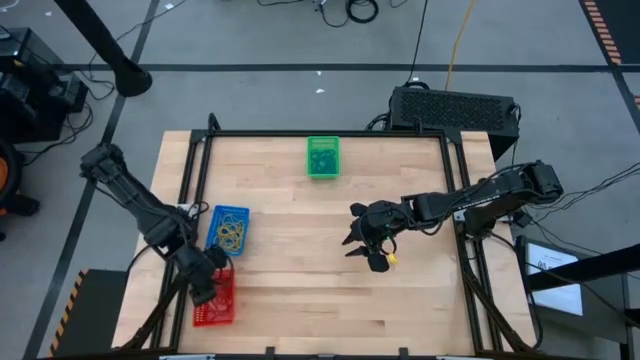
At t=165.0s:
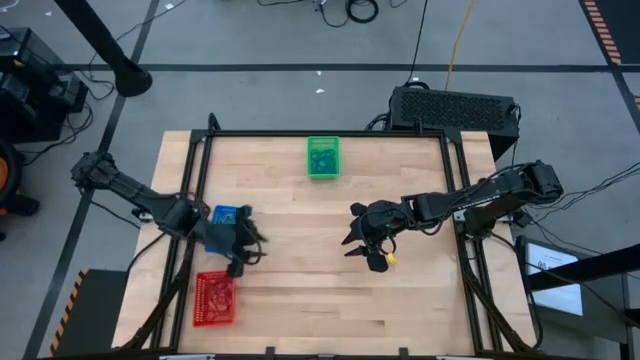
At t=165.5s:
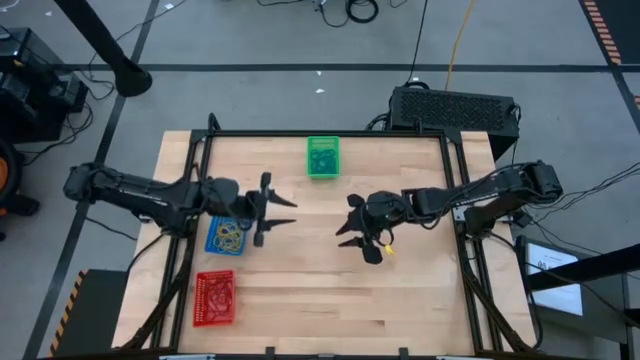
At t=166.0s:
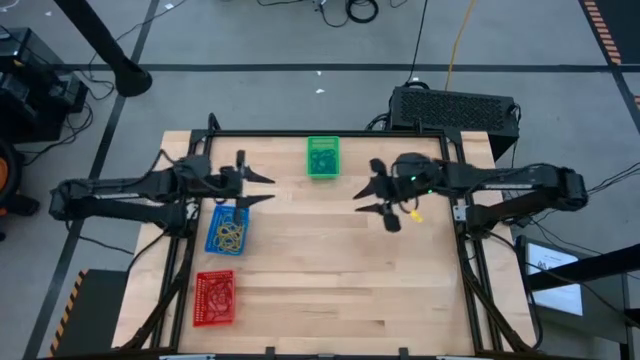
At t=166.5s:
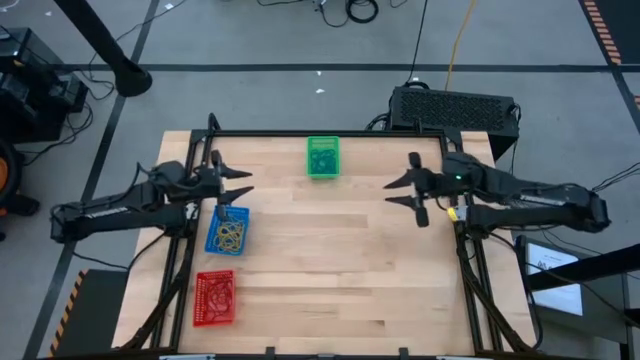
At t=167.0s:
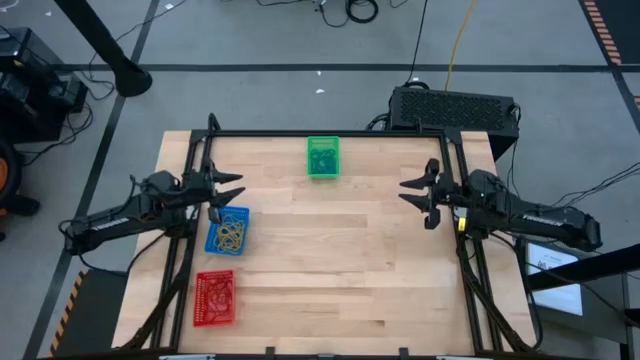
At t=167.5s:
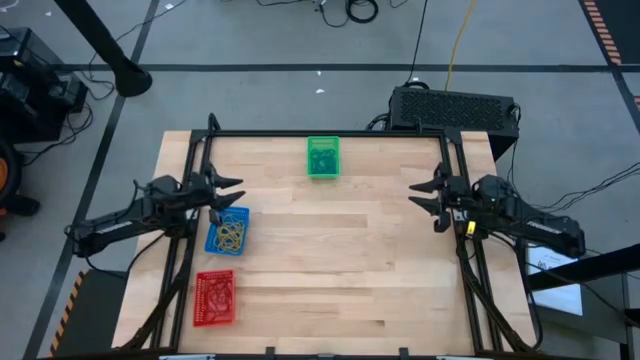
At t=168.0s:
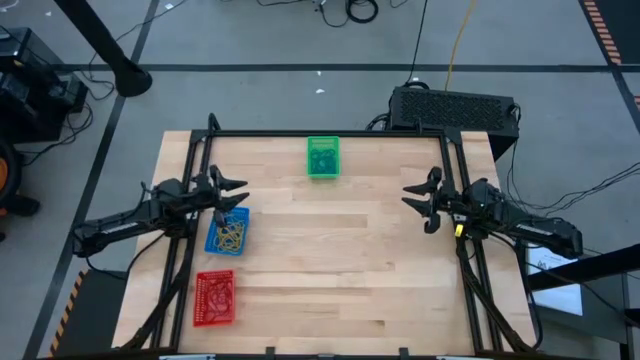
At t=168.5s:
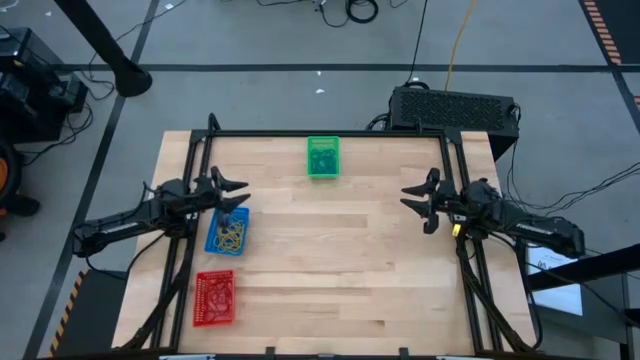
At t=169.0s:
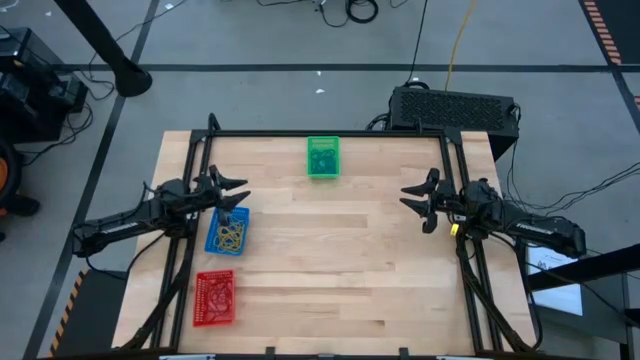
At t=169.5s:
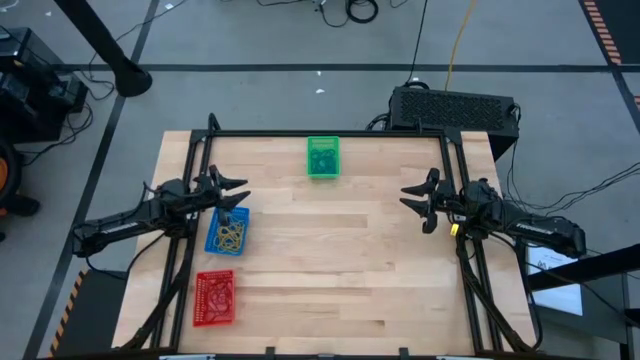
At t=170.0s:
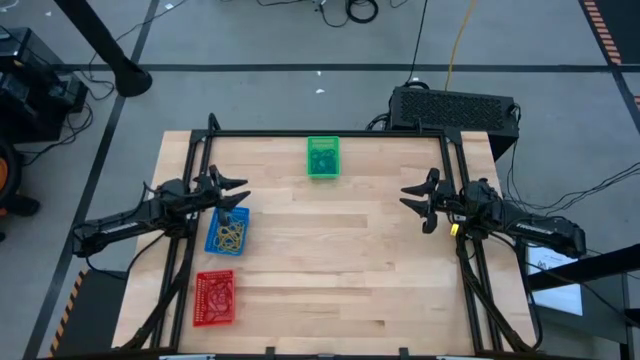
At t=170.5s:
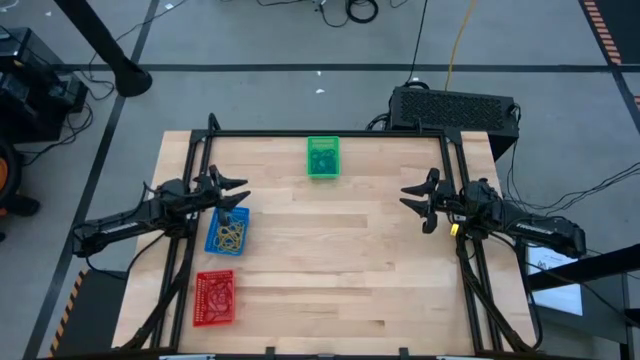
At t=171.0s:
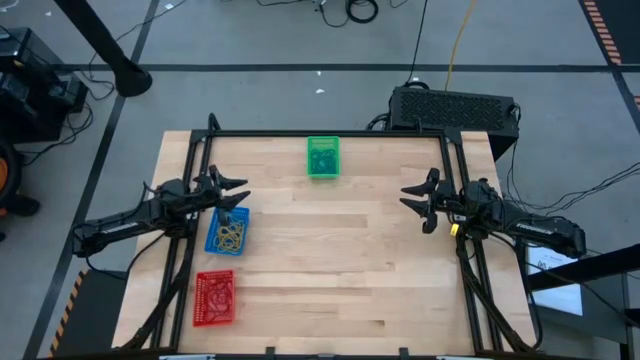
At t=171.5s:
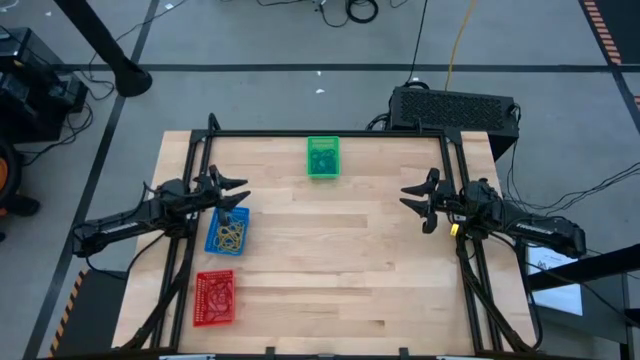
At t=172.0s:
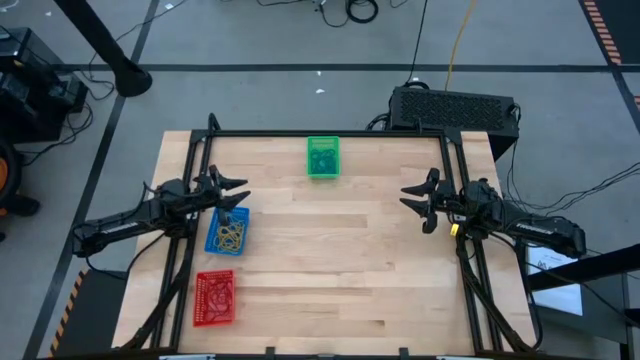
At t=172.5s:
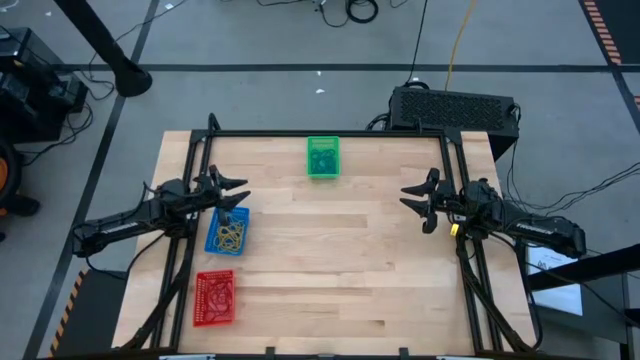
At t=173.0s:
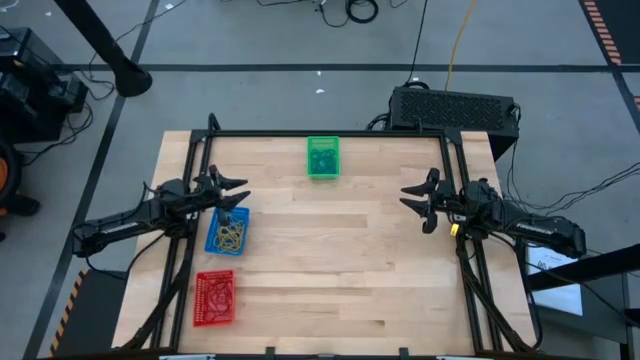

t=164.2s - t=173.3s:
Task: Sort rubber bands into baskets
Return to Home Position

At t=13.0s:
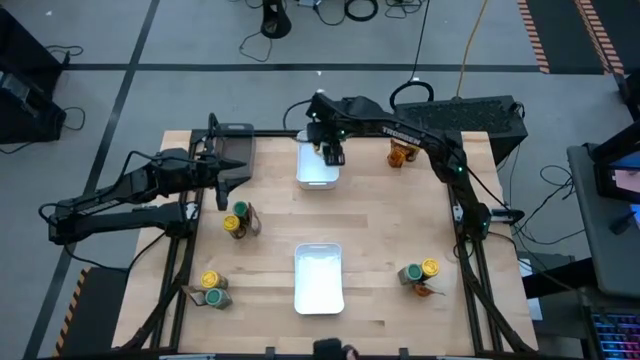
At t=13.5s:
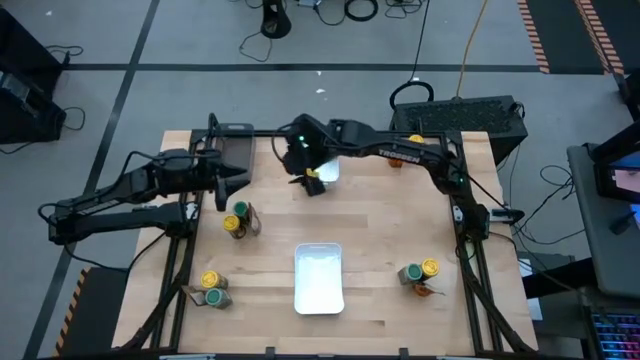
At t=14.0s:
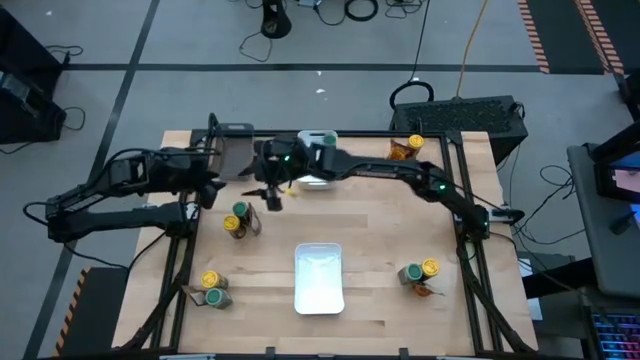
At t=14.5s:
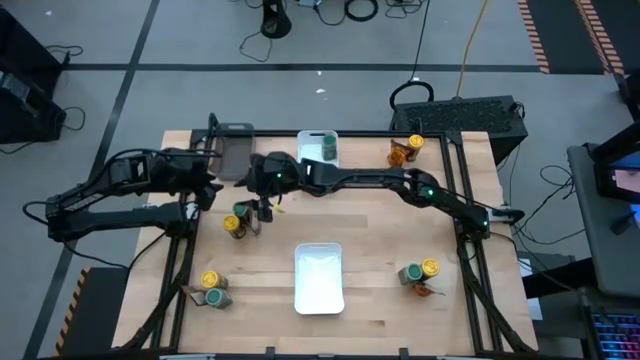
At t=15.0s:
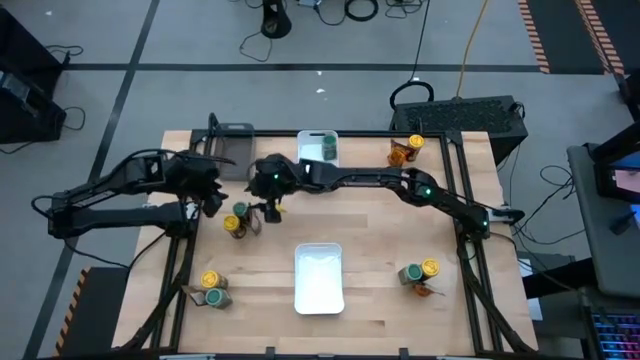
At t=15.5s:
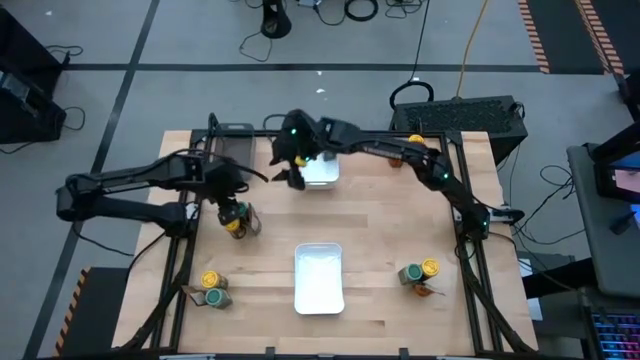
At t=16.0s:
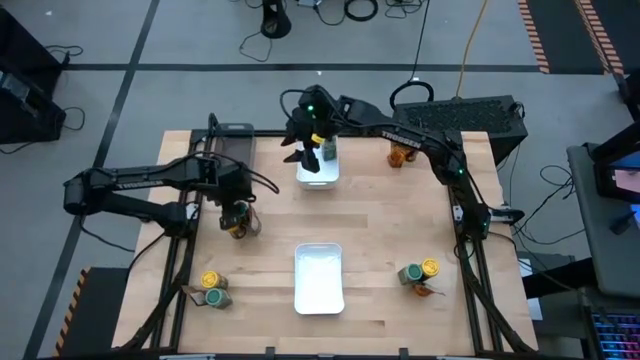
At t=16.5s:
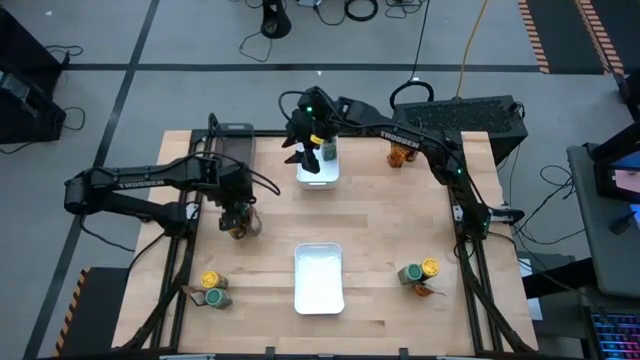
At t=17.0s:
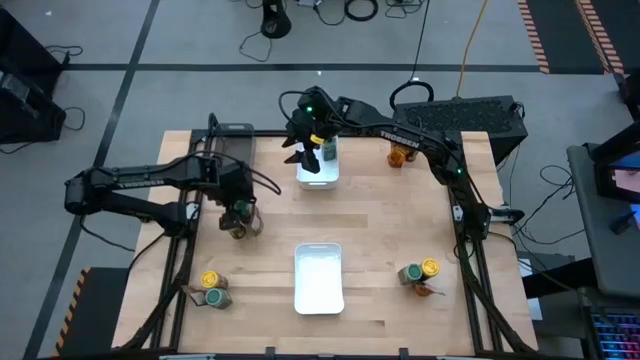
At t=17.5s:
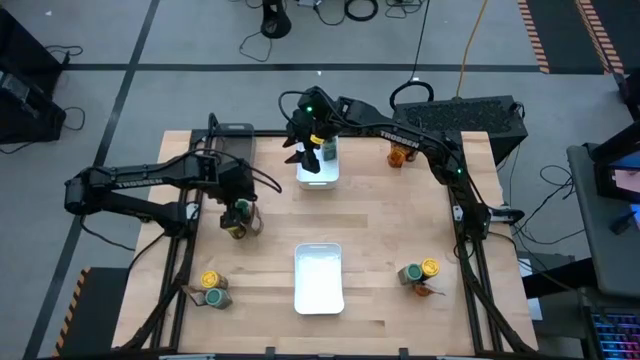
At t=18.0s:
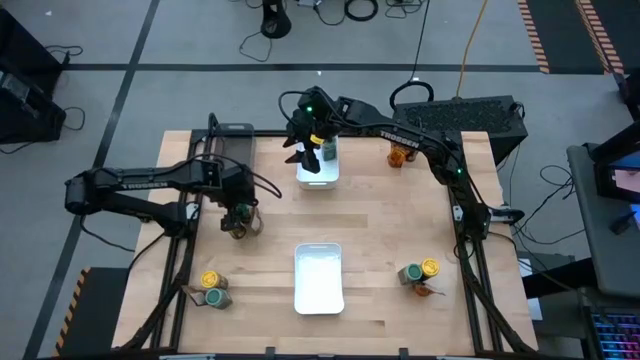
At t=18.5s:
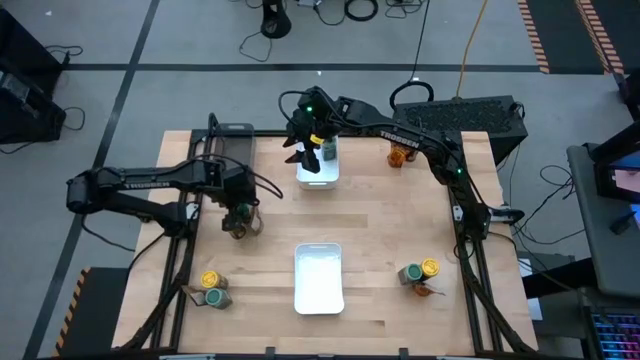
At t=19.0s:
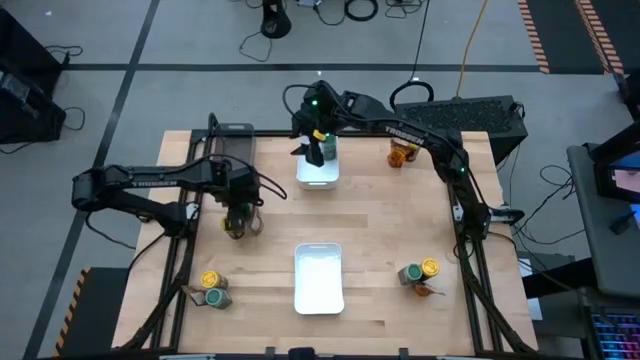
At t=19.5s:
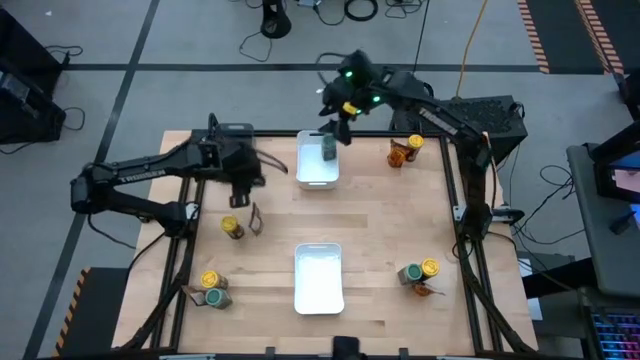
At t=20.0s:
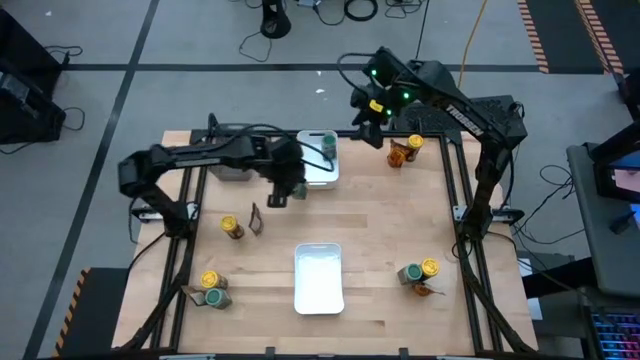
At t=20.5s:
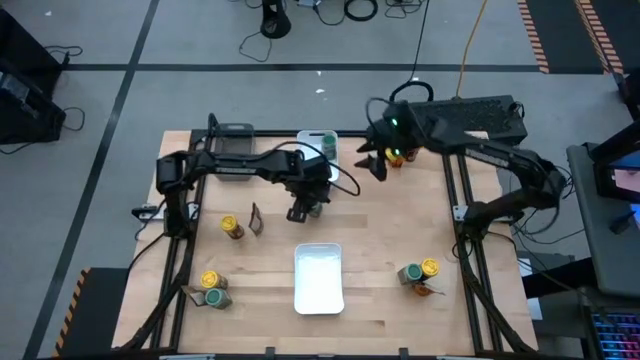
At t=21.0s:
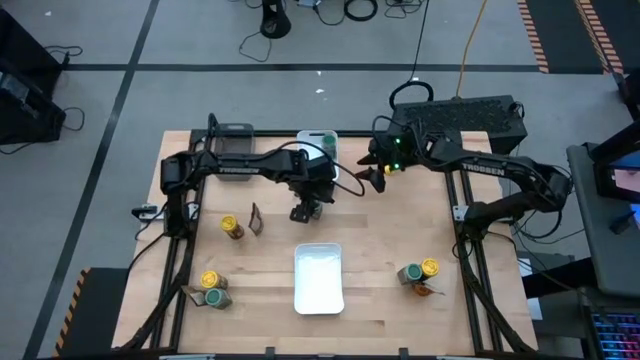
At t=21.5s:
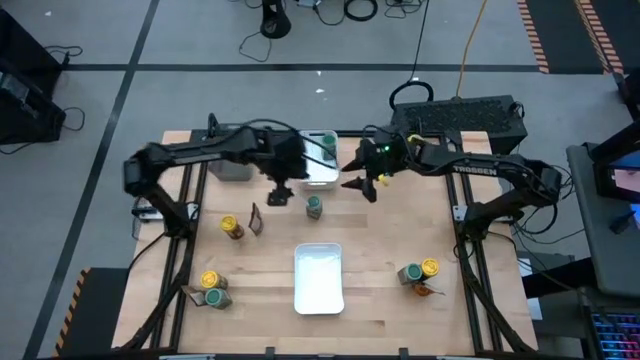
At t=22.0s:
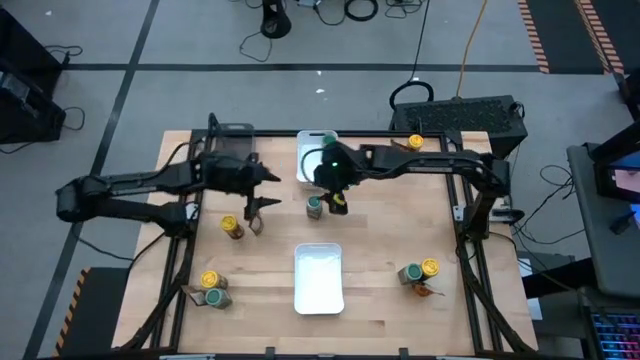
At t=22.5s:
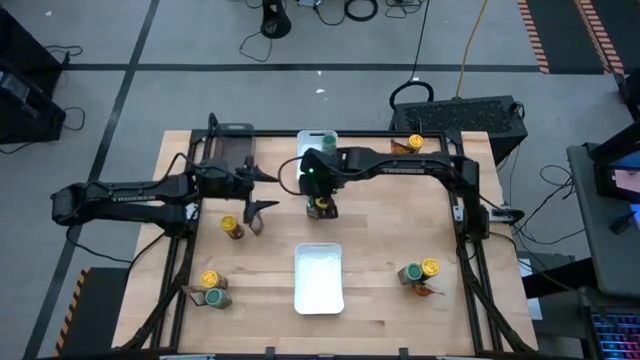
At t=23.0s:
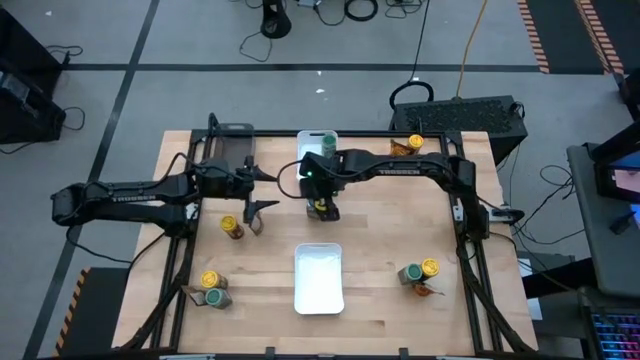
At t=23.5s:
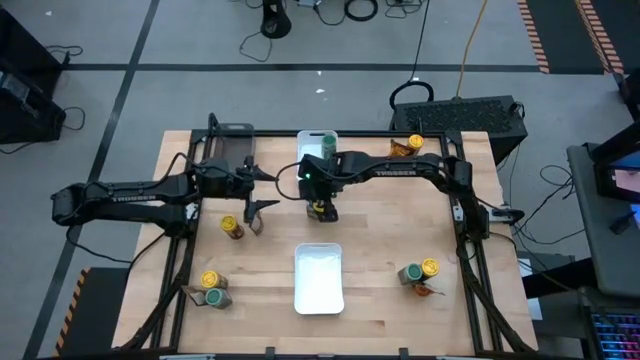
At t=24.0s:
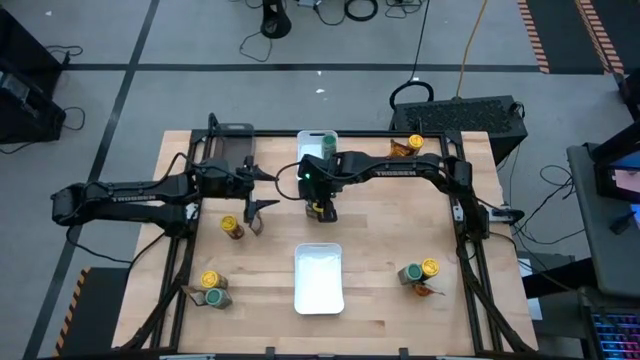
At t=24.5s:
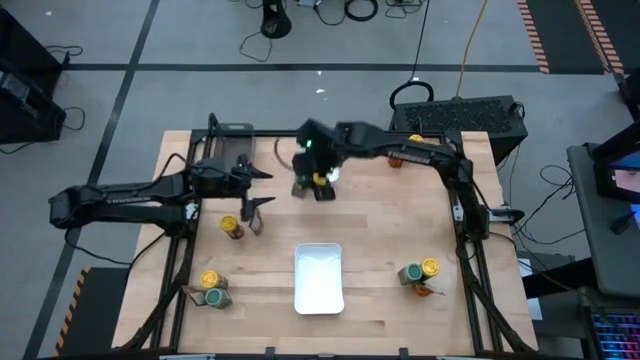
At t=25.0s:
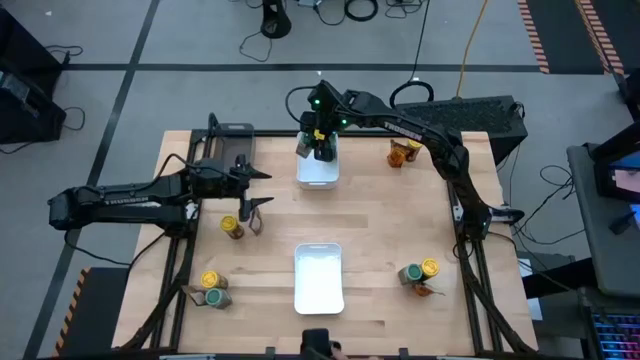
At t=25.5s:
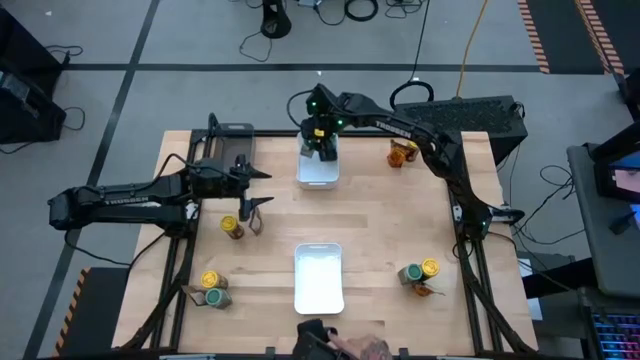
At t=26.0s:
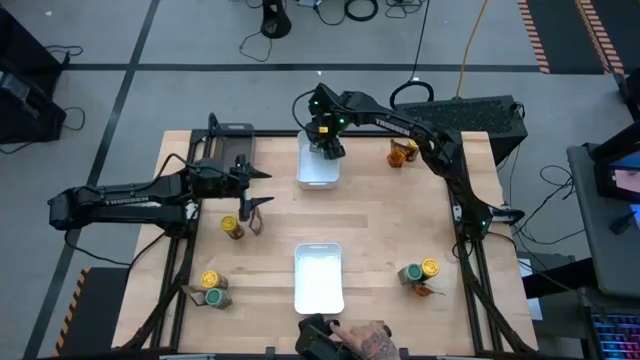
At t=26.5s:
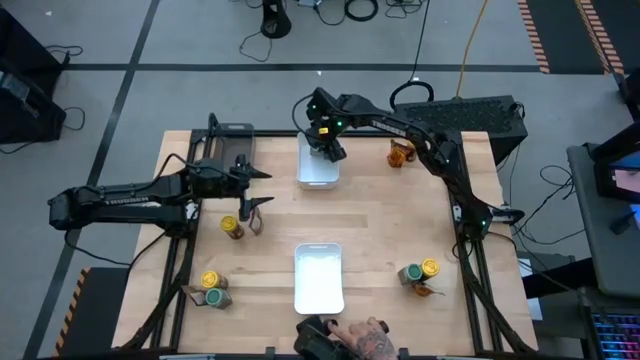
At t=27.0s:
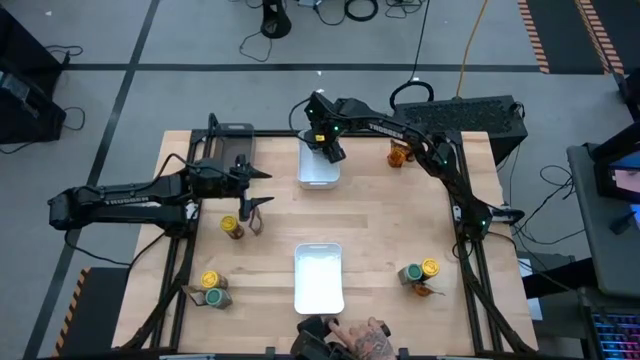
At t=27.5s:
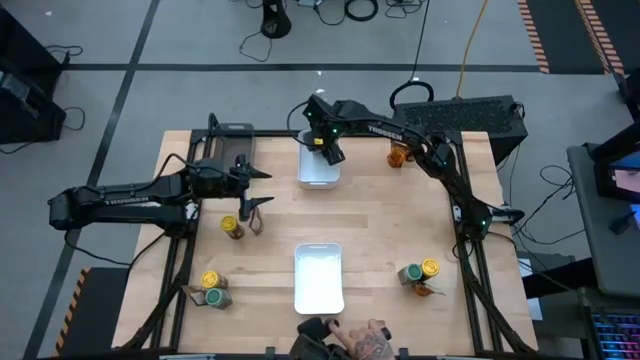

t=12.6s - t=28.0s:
Task: Sort spices by type
Put the top left green spice bottle into the top white bin
